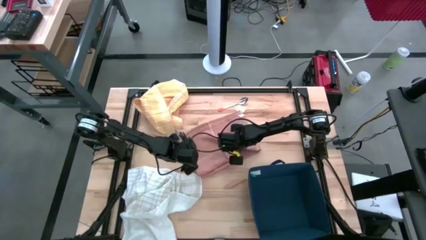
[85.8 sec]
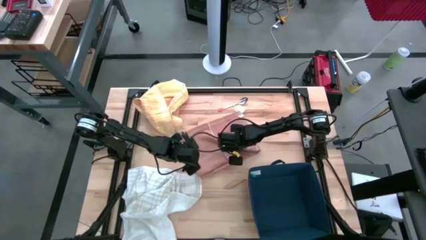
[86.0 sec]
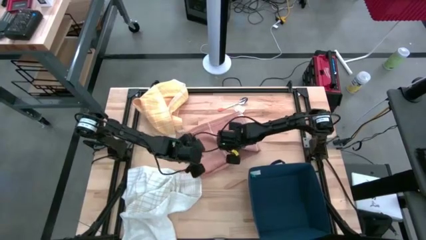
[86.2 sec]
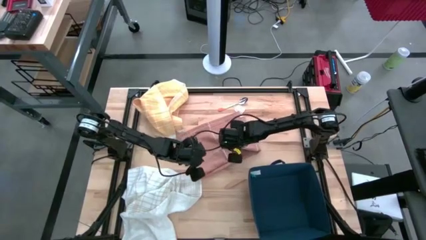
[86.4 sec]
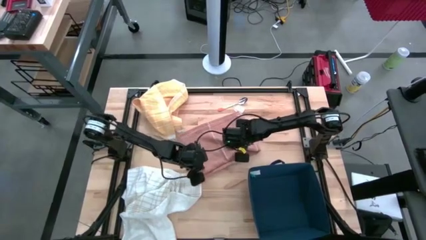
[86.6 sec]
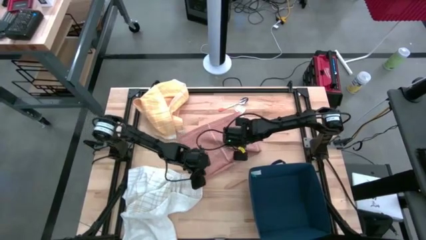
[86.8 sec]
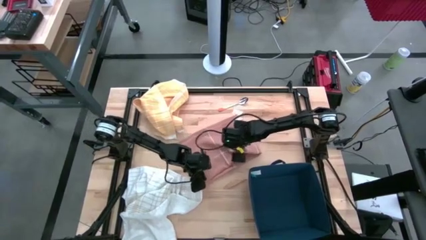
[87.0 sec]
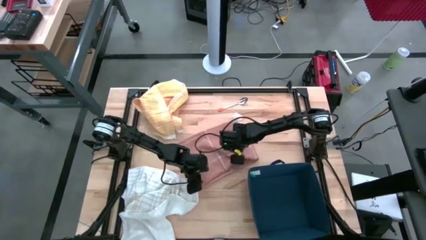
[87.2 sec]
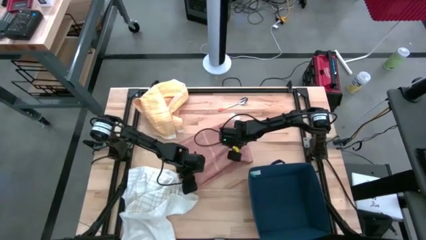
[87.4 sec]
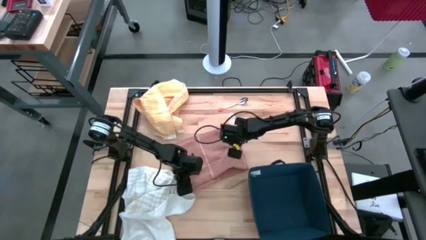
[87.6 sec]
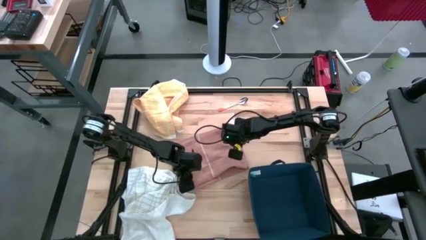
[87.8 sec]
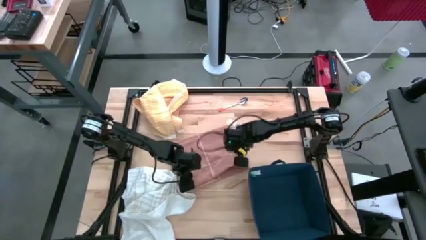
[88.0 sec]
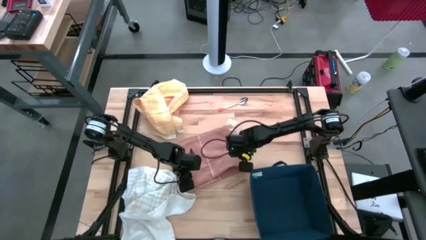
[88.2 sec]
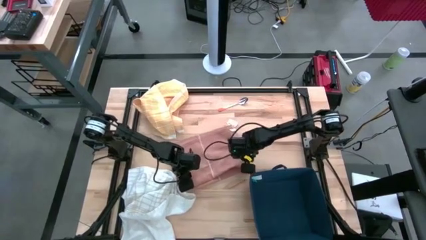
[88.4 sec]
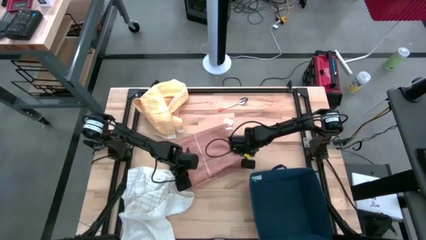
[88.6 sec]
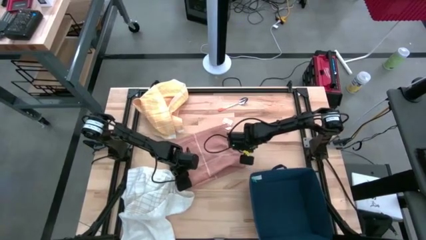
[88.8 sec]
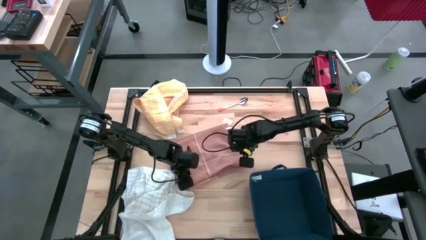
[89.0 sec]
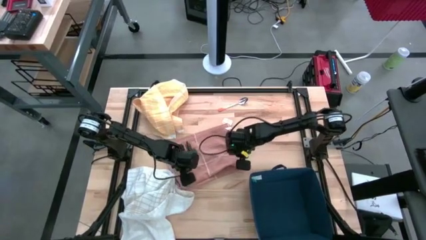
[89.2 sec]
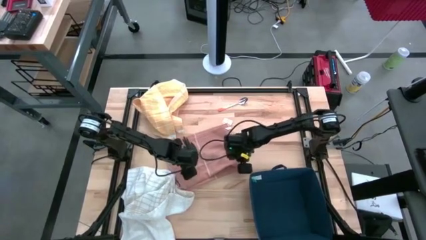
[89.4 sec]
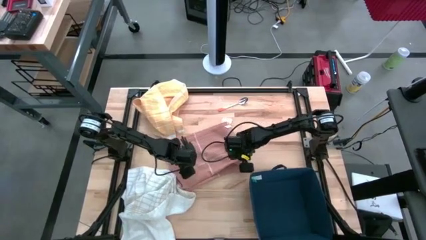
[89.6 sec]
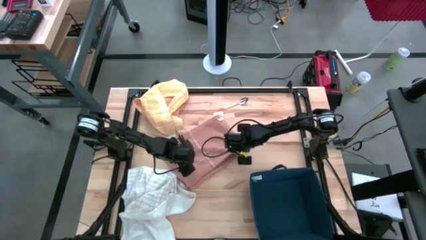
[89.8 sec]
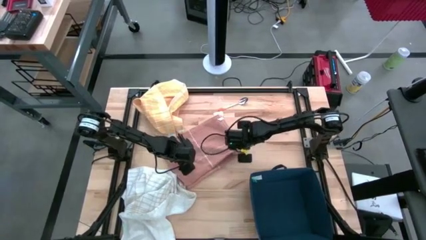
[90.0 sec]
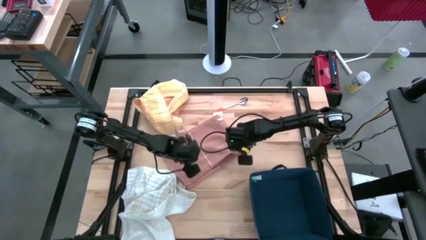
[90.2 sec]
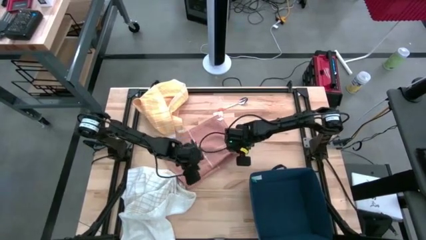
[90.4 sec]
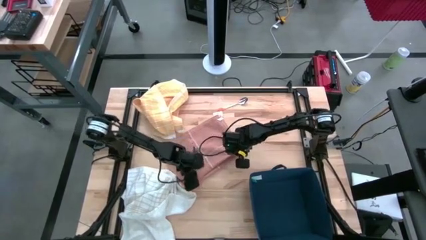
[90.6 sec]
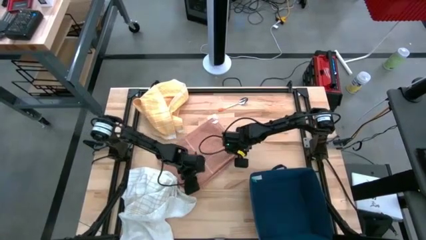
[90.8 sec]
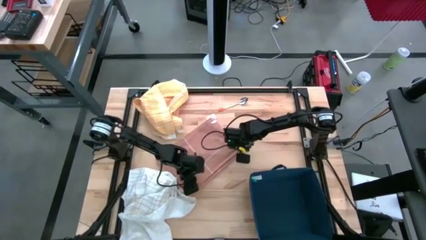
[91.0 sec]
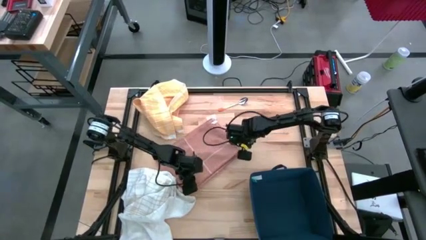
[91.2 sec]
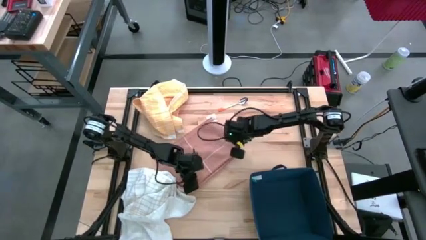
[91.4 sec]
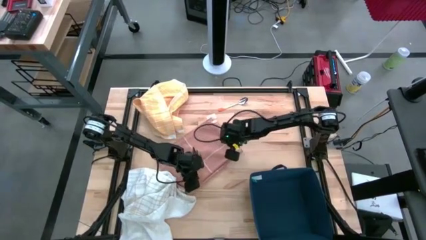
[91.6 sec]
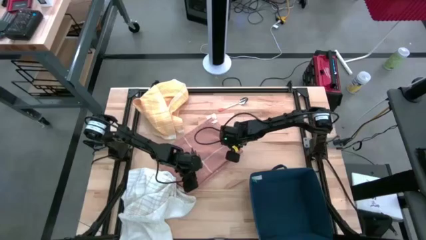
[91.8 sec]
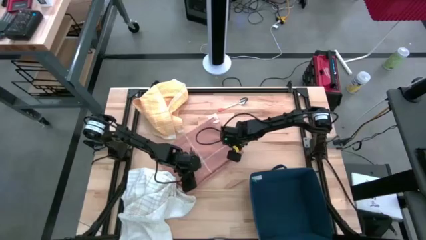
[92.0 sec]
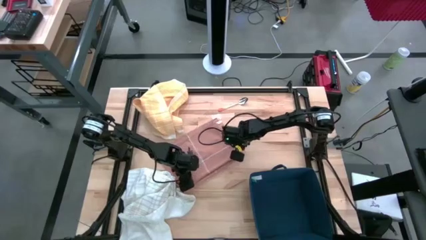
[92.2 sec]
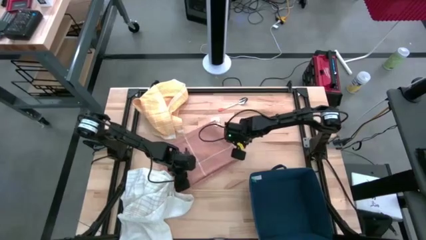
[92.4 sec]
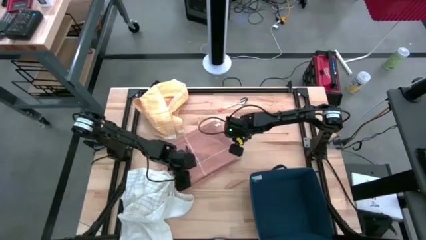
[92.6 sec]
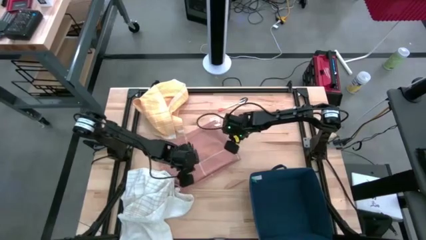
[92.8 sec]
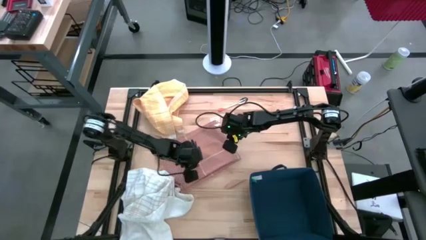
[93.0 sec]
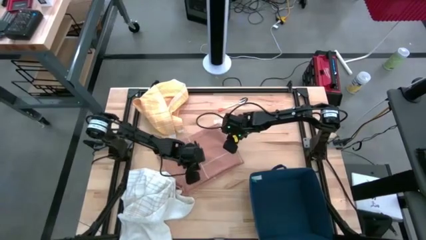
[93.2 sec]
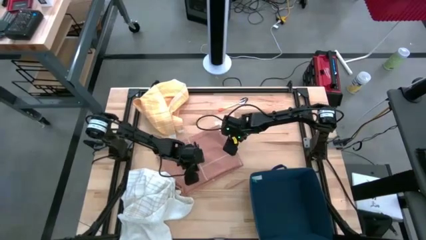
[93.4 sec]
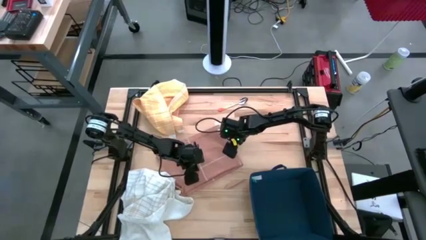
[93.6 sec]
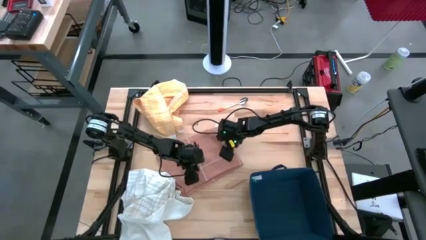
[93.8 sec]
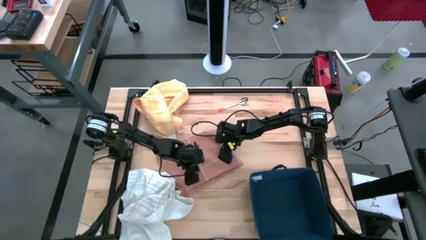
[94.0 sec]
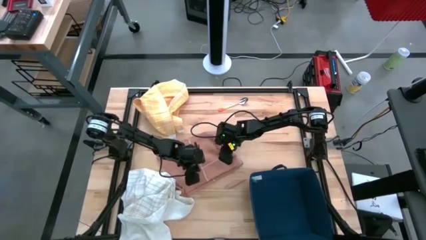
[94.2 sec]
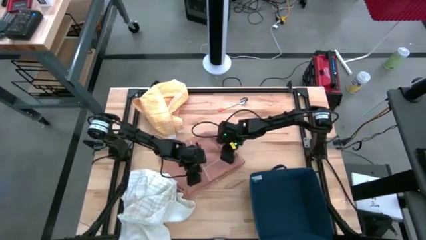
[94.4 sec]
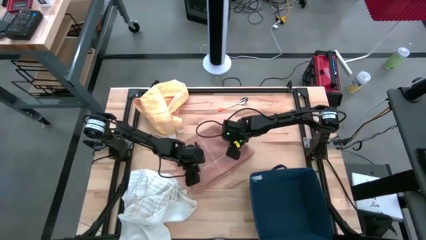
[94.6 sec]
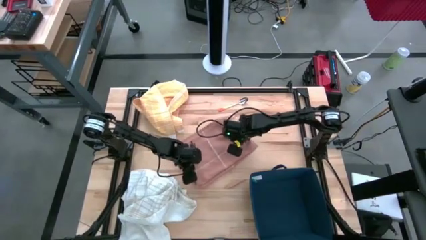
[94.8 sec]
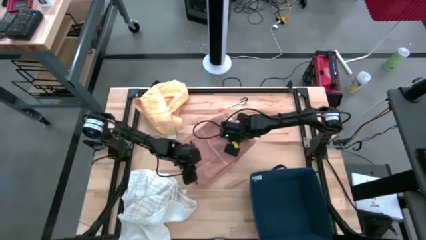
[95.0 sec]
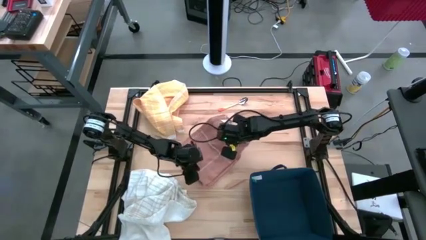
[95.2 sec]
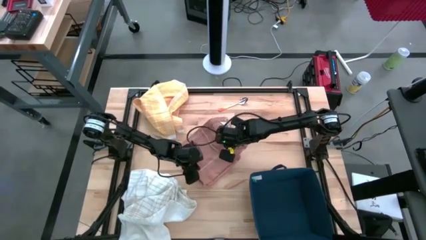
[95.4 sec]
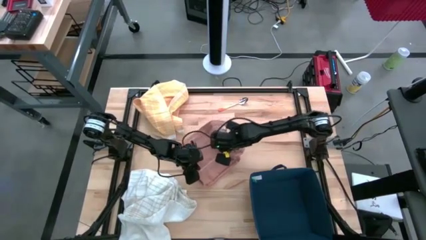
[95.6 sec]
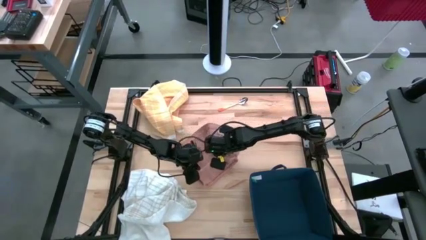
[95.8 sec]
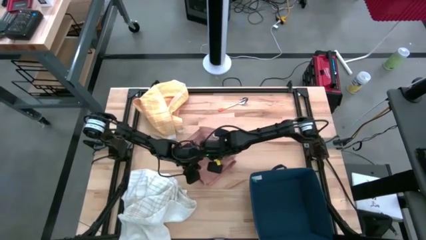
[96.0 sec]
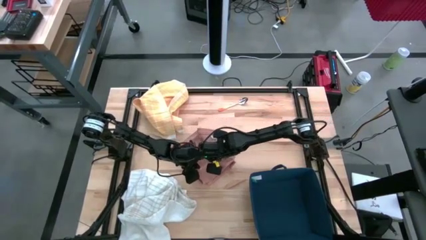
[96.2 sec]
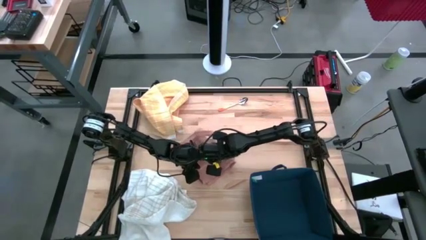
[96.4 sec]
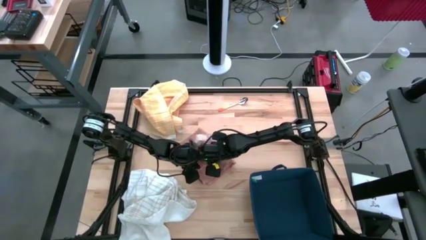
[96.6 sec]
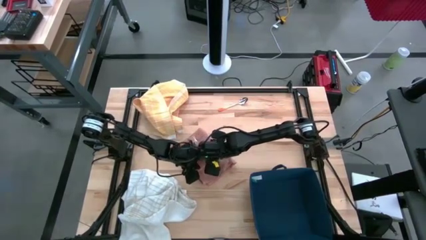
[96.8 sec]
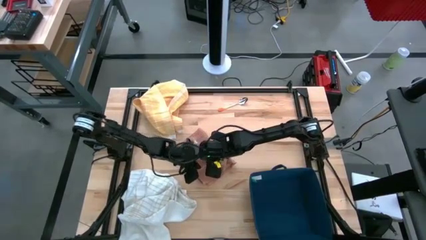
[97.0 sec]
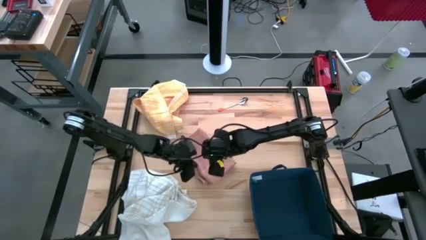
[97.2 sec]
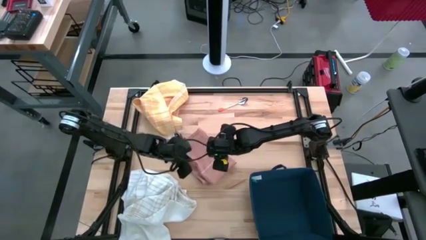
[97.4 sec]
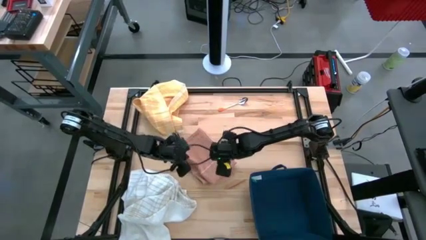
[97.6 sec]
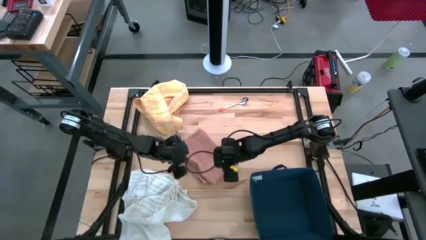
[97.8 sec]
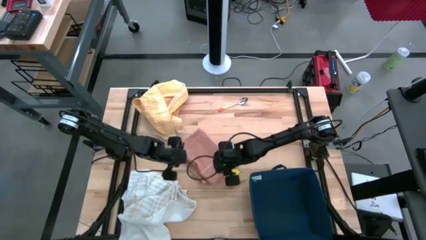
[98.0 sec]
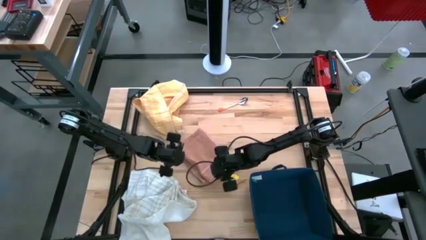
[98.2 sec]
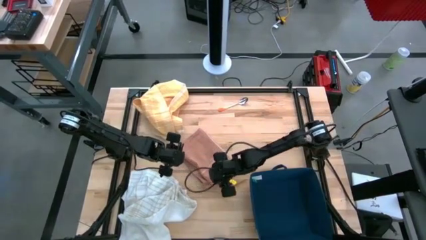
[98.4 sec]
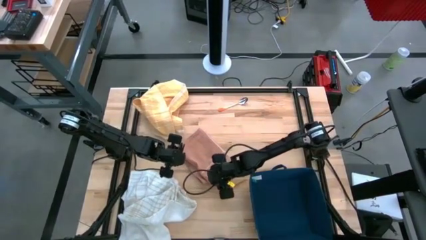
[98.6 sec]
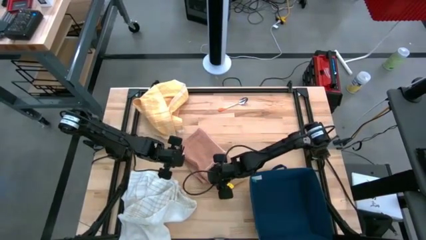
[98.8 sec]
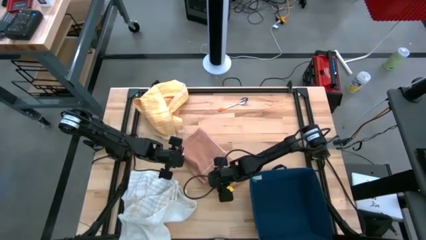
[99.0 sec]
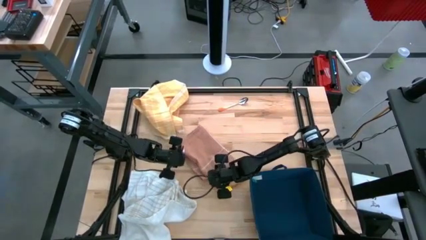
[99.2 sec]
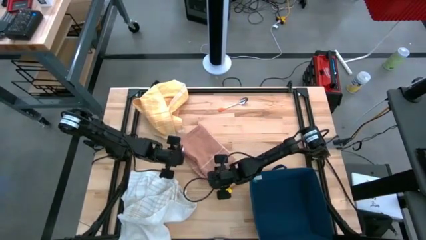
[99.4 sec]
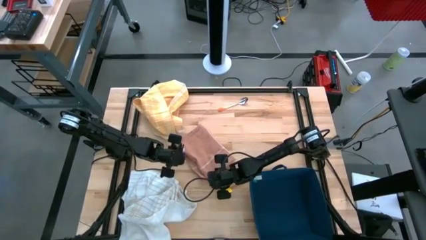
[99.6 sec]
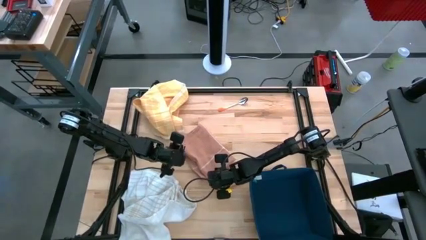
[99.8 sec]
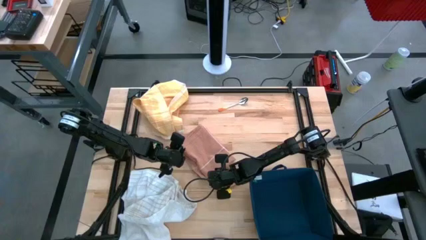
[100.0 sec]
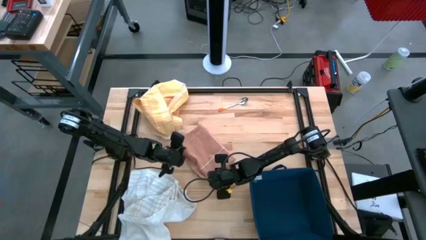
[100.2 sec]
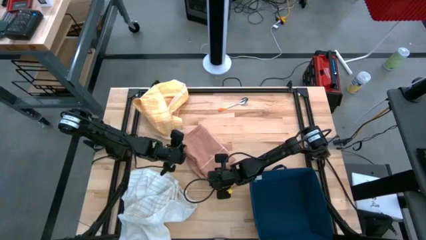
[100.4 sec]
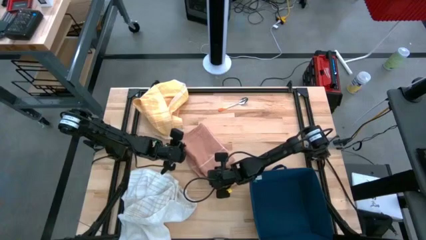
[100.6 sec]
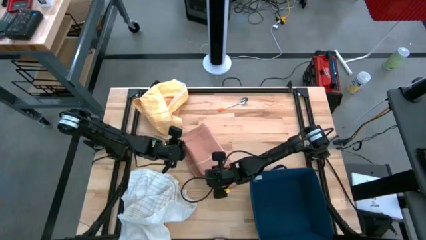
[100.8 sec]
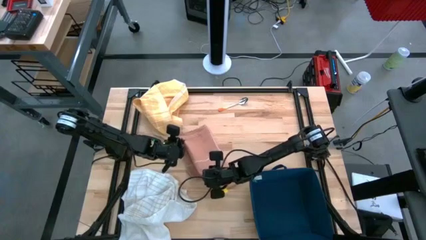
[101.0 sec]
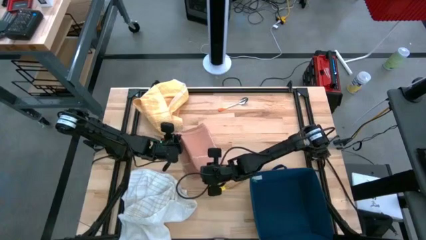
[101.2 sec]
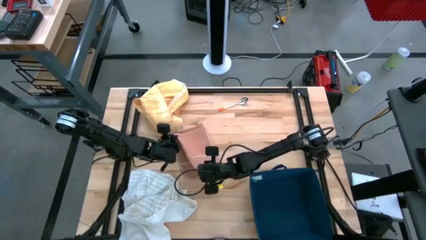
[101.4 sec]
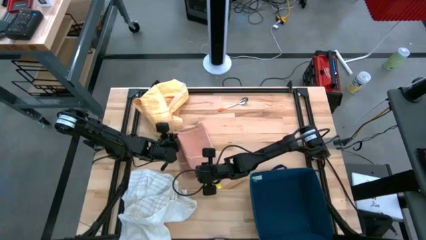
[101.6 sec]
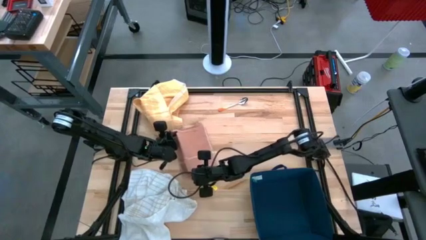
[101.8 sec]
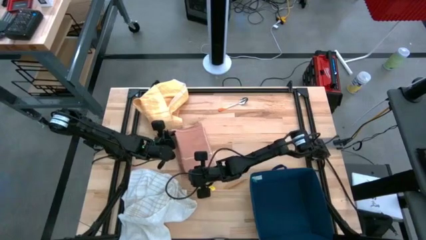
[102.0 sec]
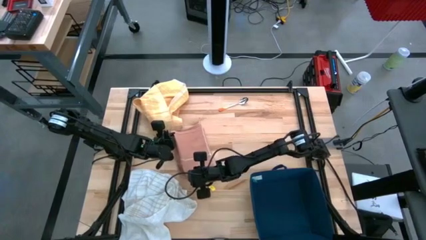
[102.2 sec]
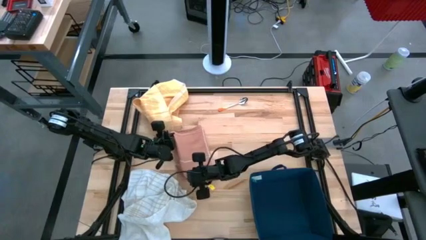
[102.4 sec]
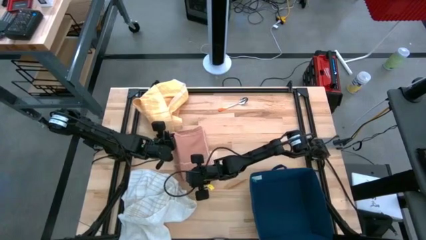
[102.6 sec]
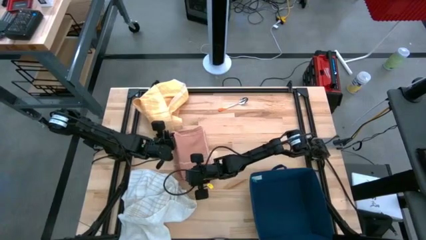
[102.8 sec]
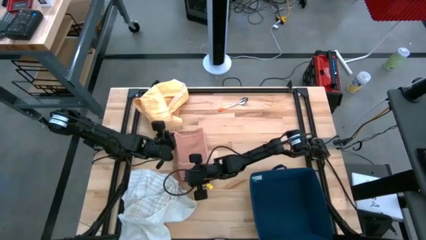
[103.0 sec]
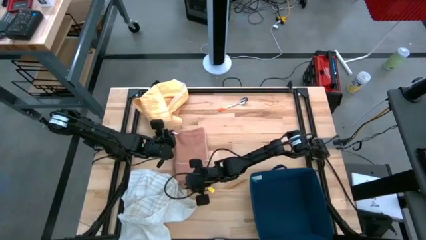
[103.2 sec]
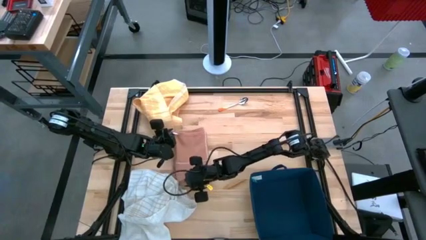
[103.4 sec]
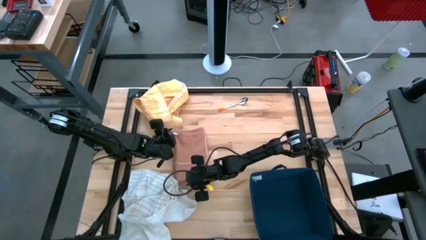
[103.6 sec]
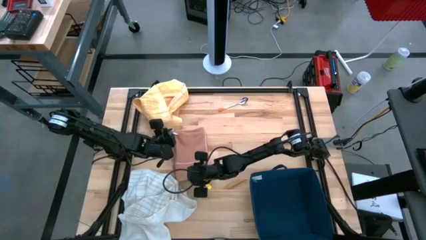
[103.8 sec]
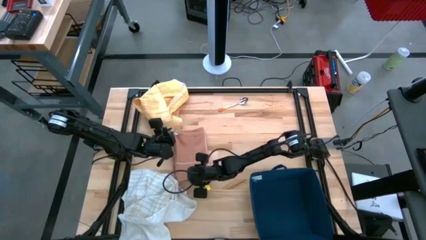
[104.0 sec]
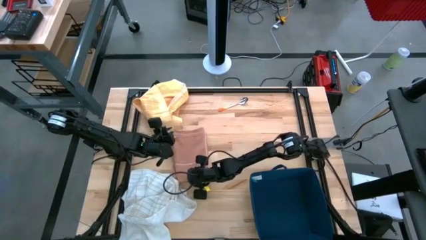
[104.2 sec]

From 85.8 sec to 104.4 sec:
Task: Fold towel
Fold the brown towel
